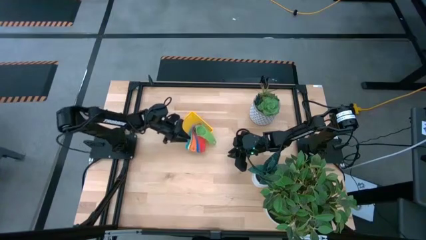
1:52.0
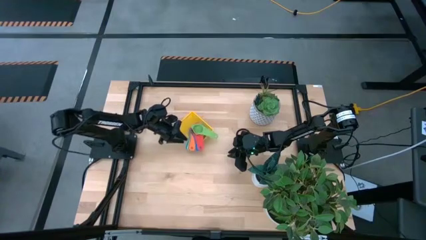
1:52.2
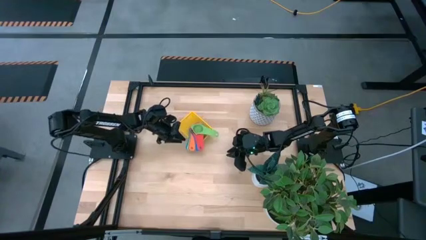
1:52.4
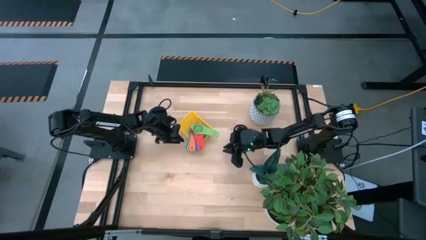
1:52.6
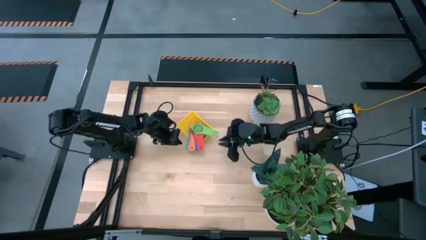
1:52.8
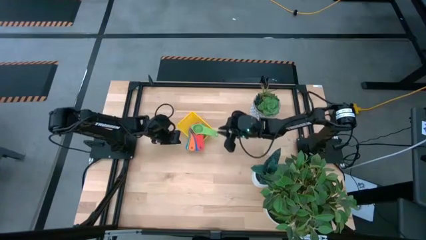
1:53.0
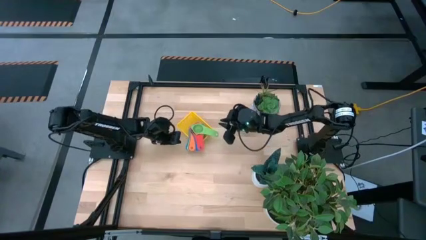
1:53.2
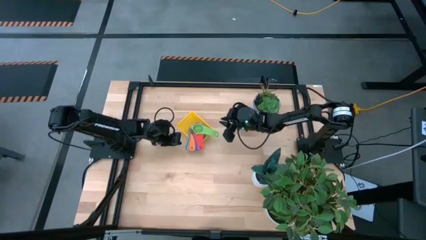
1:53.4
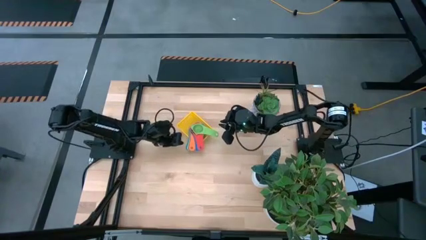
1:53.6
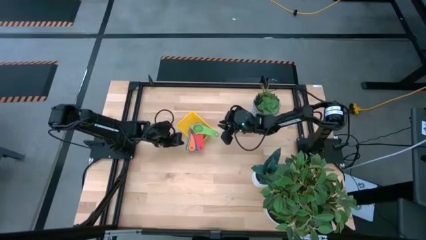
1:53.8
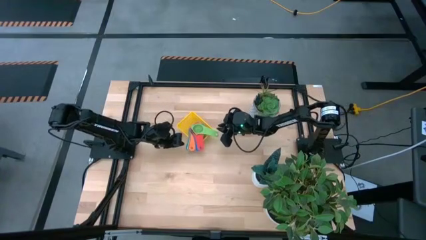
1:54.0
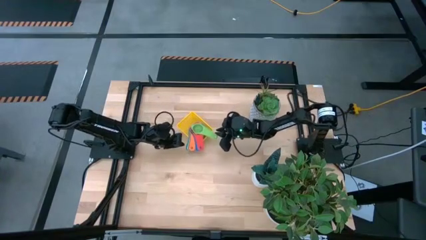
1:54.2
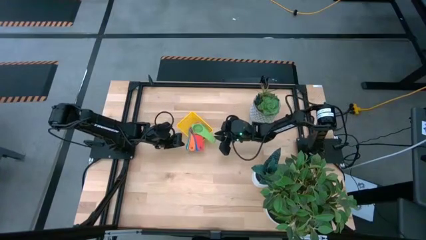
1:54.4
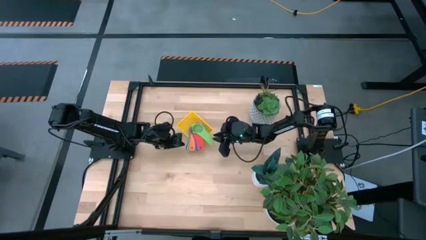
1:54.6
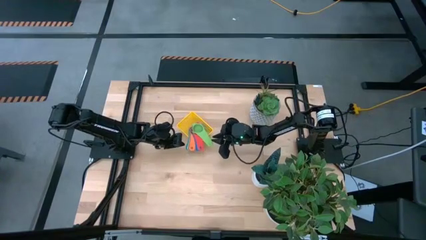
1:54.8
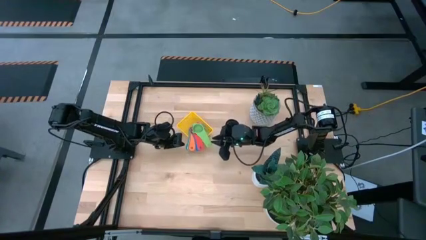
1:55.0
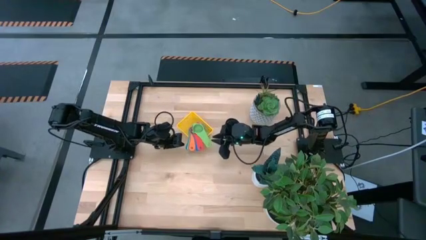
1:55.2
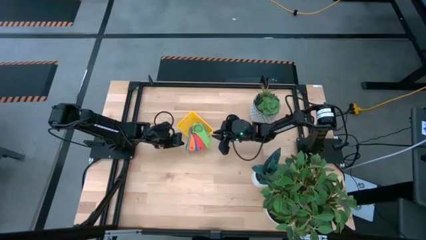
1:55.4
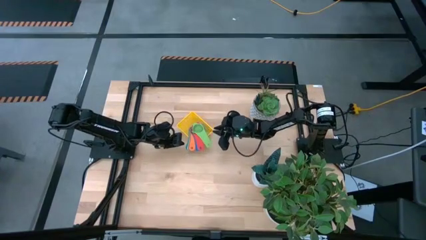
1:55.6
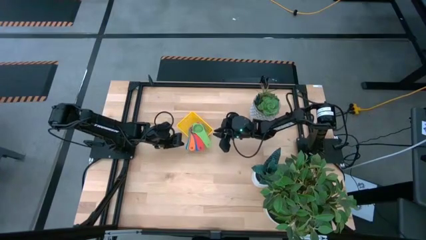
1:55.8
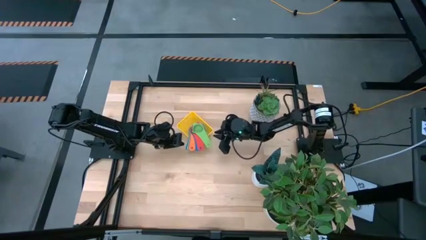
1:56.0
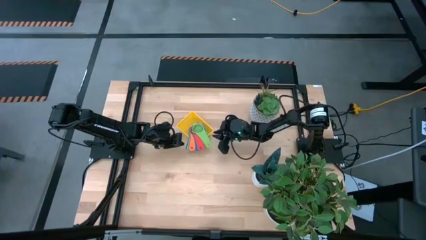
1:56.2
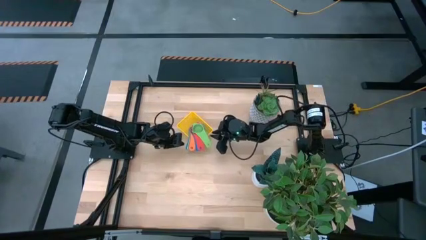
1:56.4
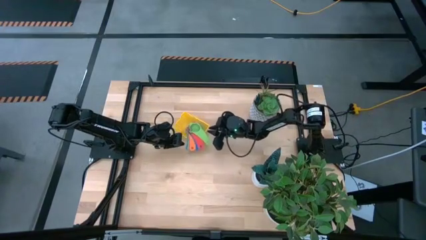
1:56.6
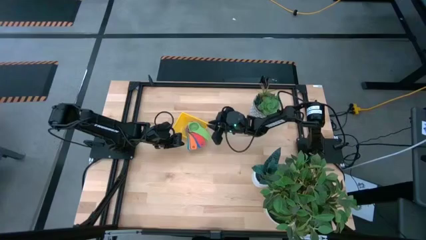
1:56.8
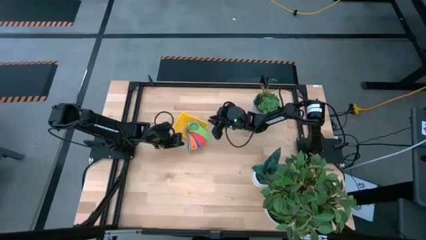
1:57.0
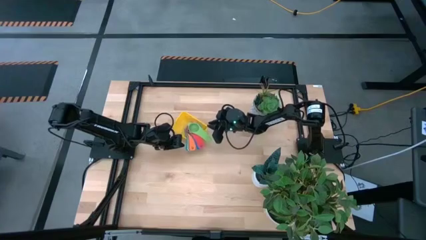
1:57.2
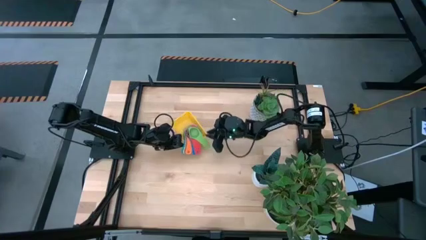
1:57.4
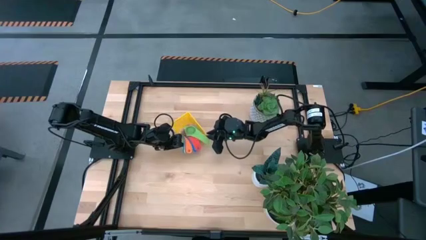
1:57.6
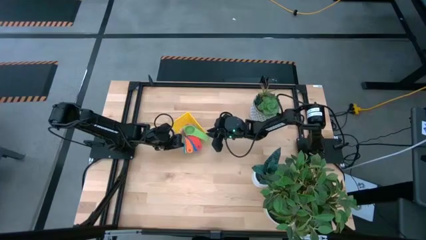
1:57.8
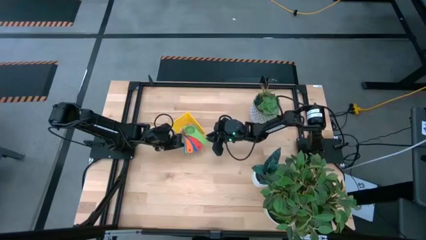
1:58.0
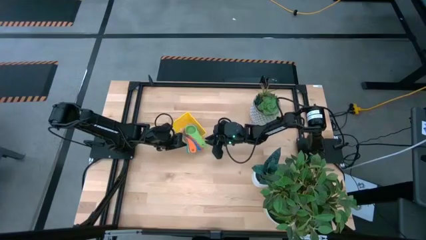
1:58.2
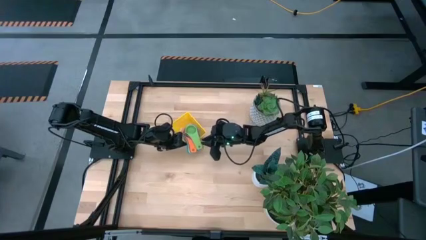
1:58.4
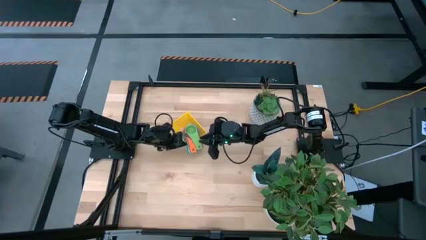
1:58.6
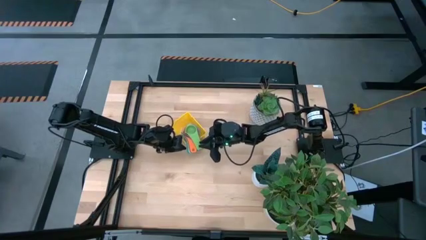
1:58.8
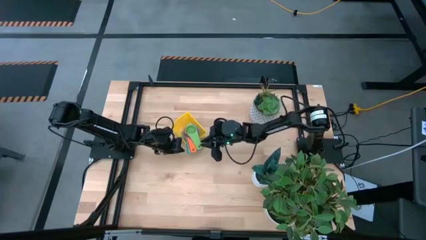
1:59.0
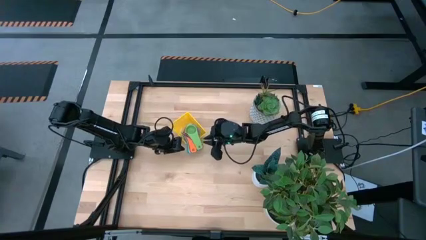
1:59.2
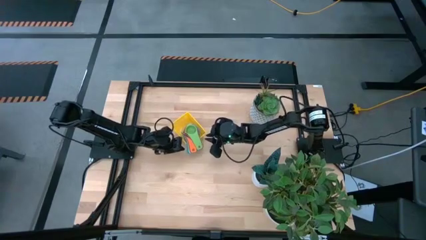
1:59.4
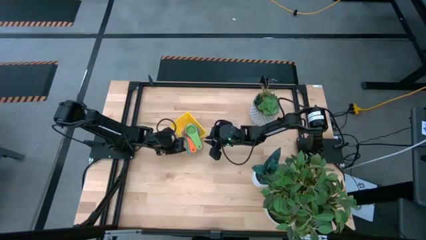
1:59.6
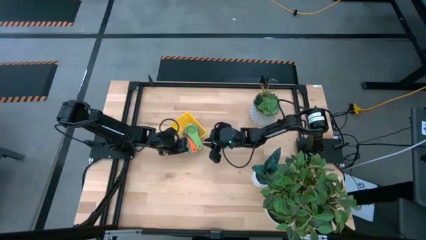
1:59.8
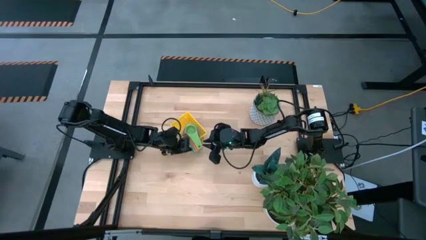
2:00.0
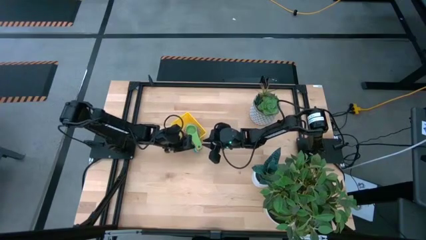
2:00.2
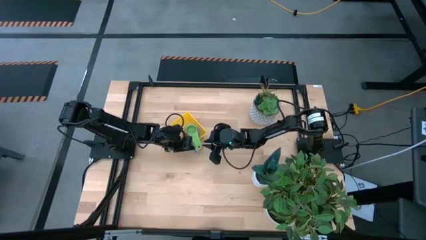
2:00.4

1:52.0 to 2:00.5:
Task: Nest measuring cups in basket
Adjust the stacked measuring cups inside the yellow bin

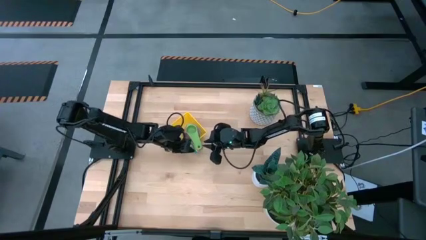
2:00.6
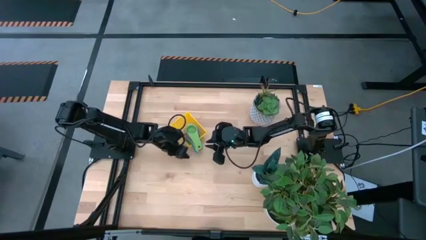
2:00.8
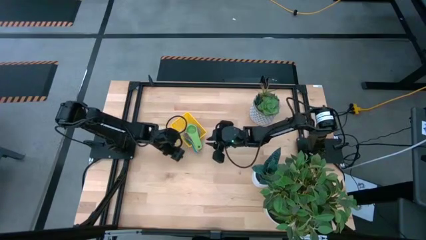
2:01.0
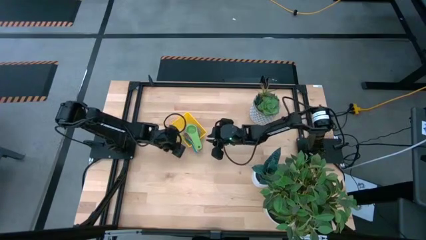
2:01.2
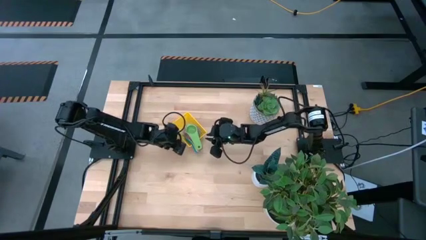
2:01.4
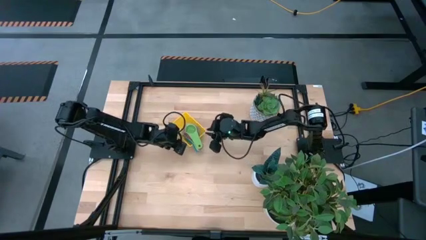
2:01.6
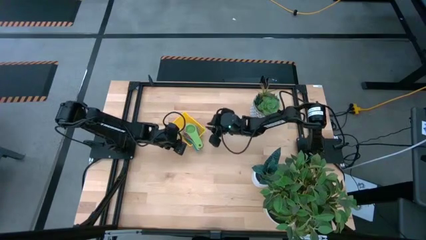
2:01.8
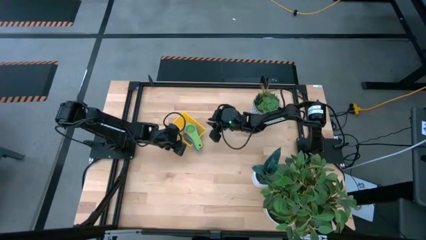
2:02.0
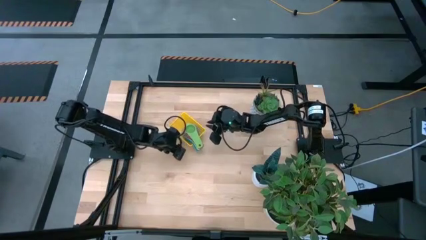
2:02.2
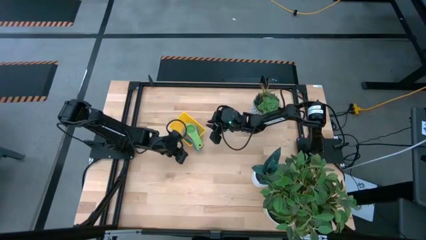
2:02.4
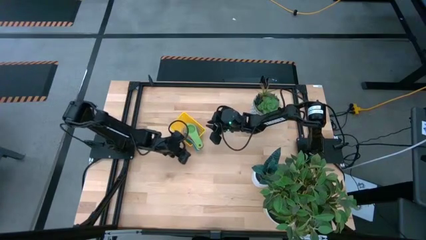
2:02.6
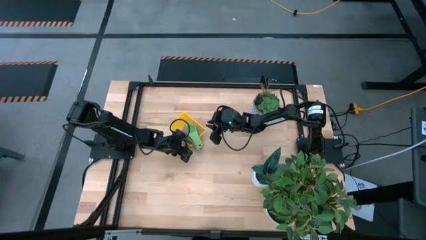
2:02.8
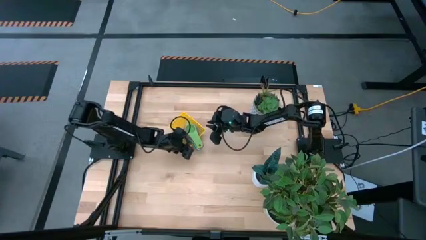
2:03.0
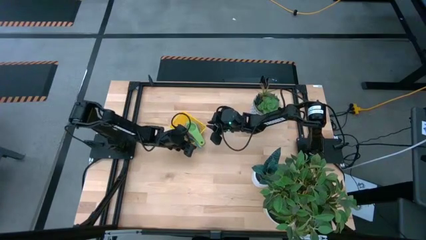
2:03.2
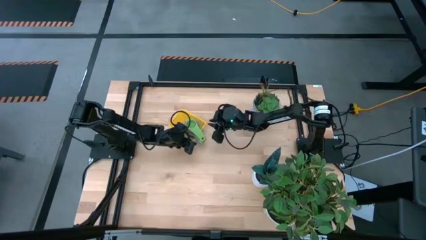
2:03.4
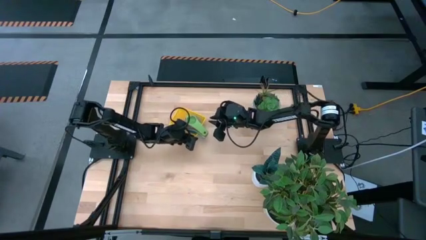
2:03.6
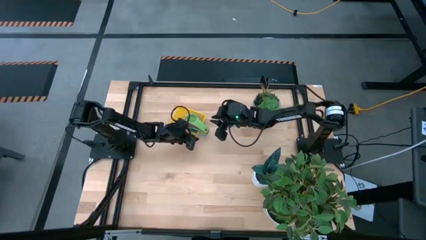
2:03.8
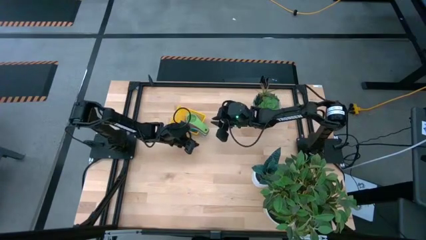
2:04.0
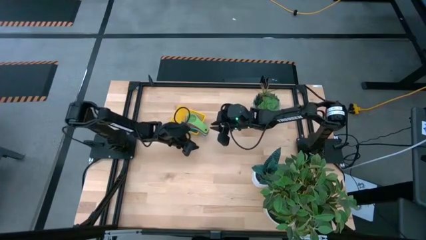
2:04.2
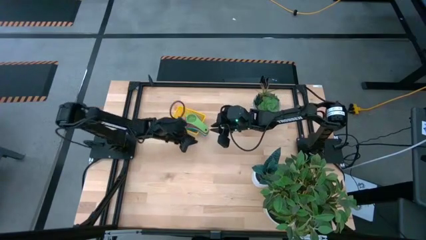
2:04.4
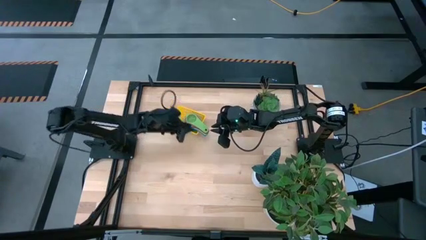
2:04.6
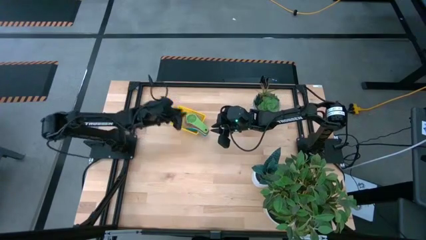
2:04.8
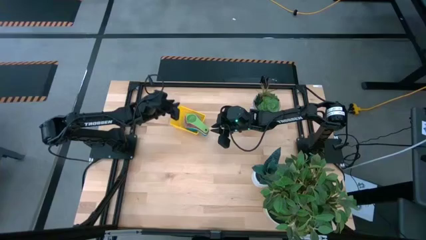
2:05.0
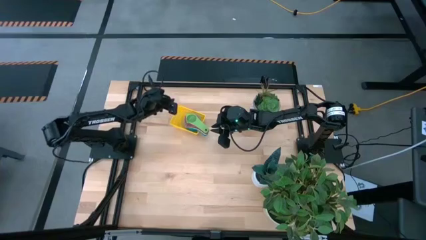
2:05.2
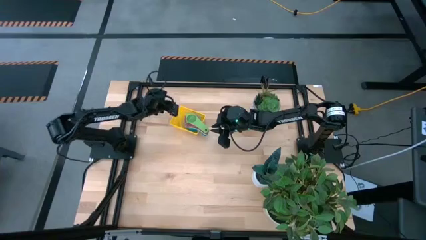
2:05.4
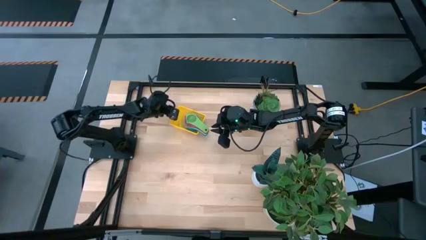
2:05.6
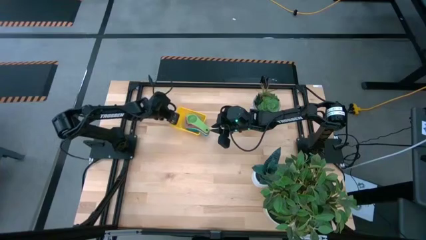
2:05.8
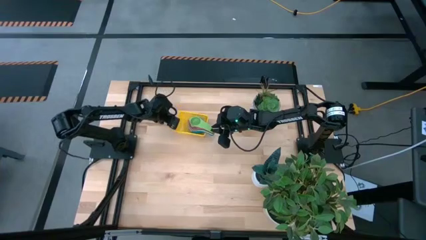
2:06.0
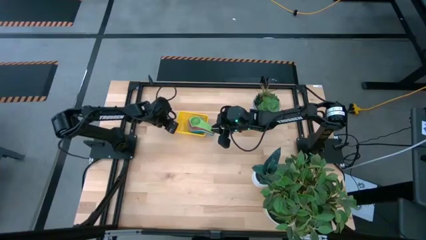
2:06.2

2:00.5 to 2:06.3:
Adjust the yellow bin
